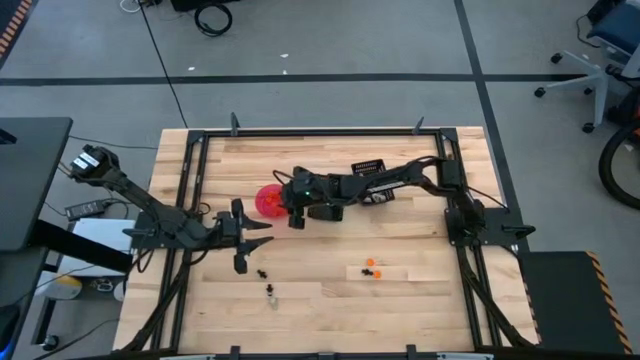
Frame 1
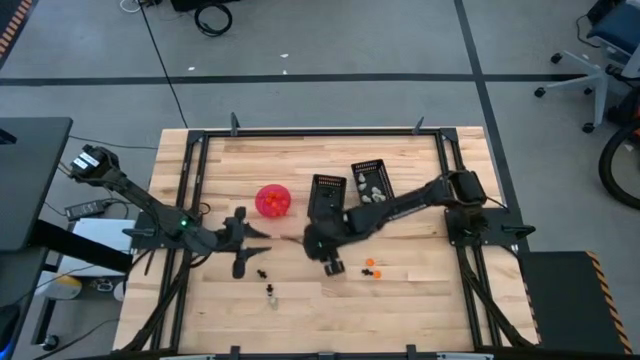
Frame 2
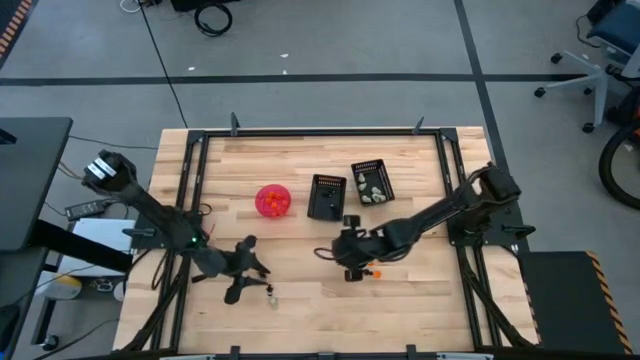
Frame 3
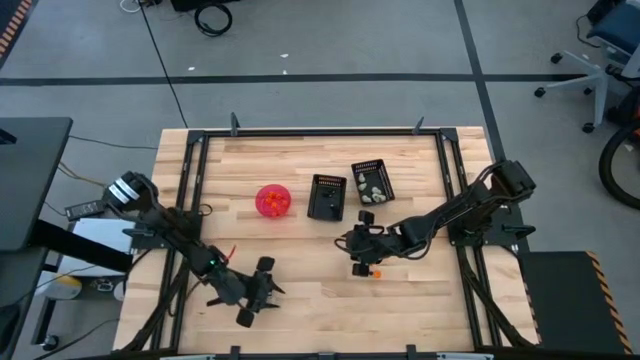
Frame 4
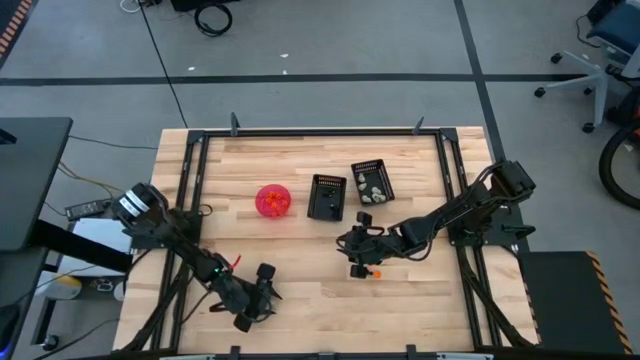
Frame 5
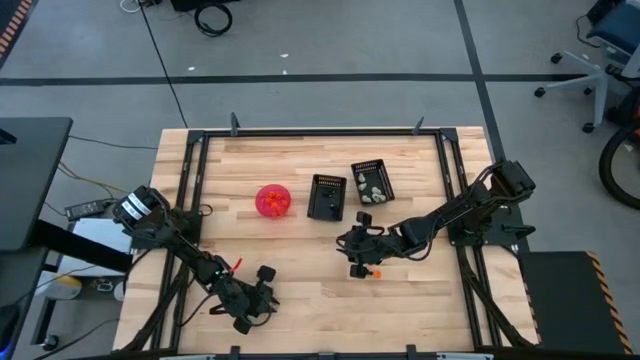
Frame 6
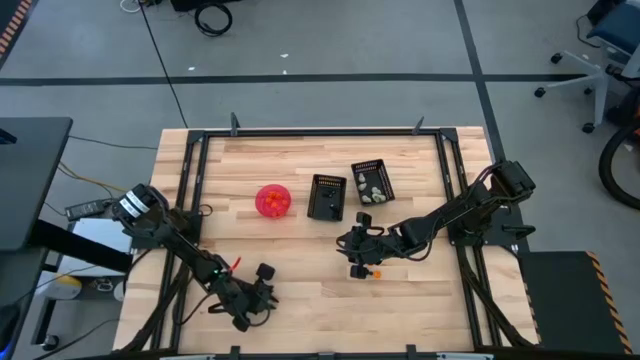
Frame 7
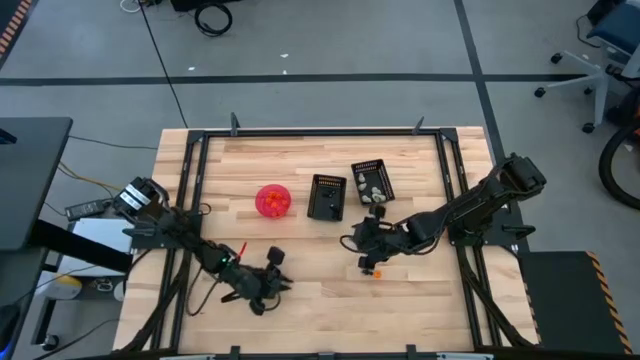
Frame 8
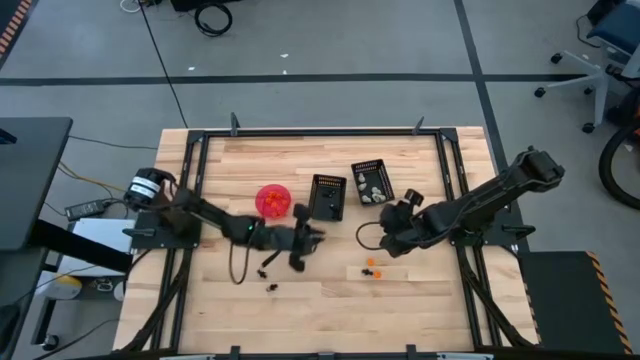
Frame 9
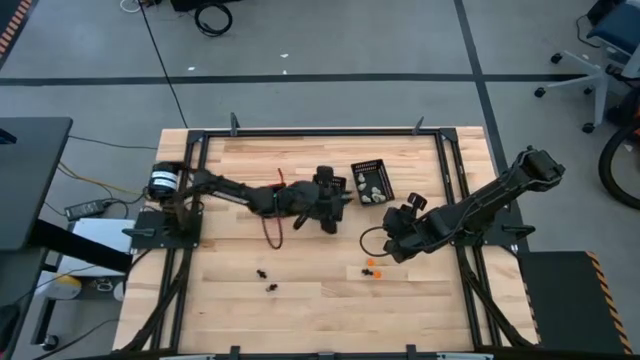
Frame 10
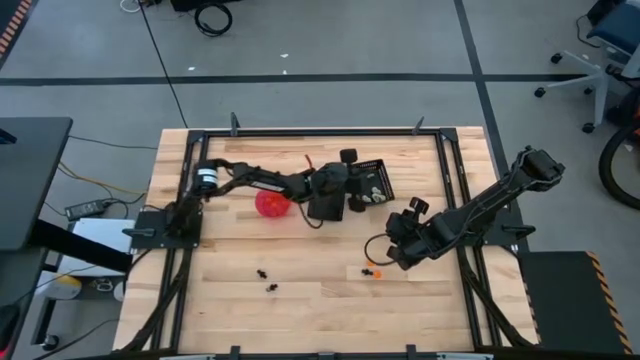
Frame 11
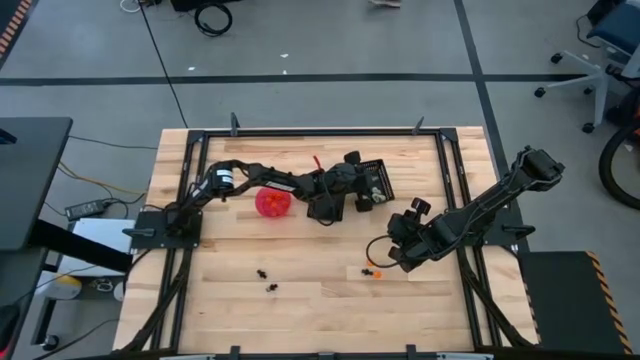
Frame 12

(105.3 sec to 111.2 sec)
Task: Sort Halloween decoration
Put the white skull toy into the right black bin

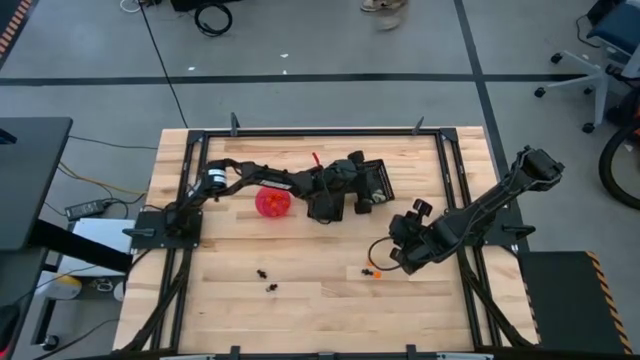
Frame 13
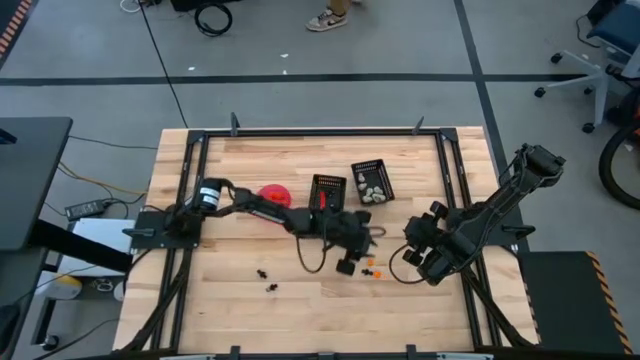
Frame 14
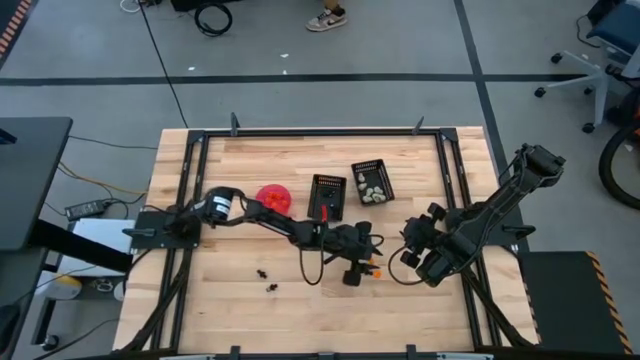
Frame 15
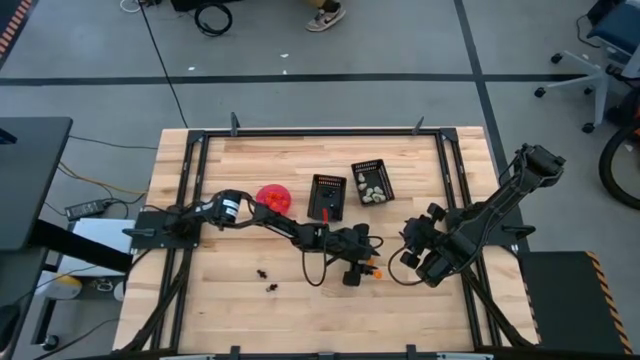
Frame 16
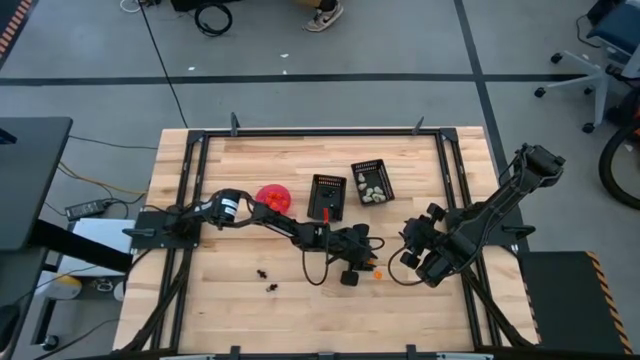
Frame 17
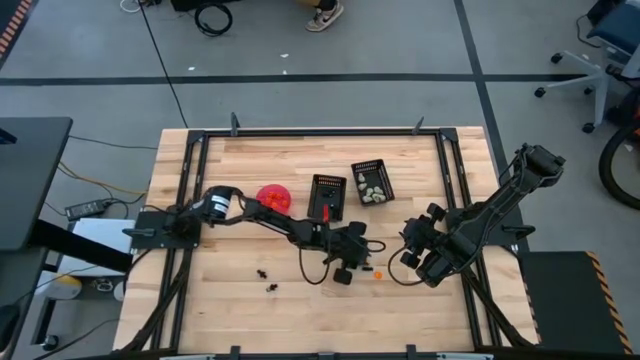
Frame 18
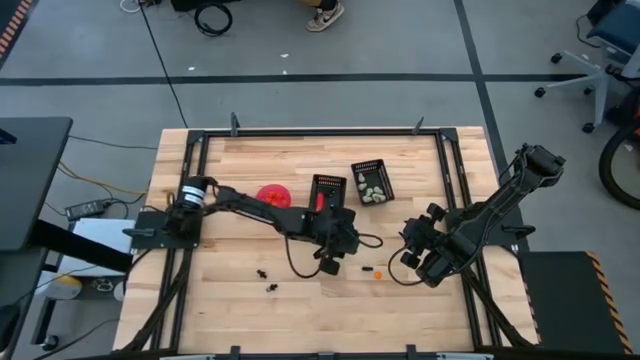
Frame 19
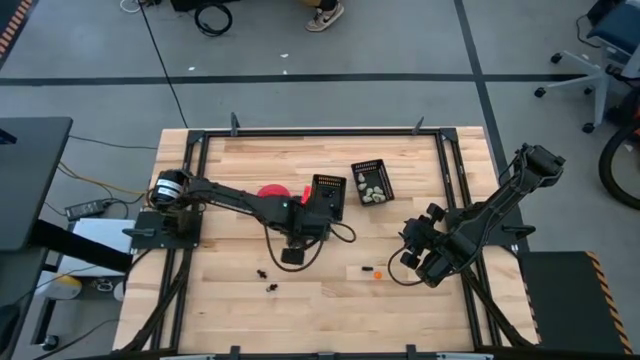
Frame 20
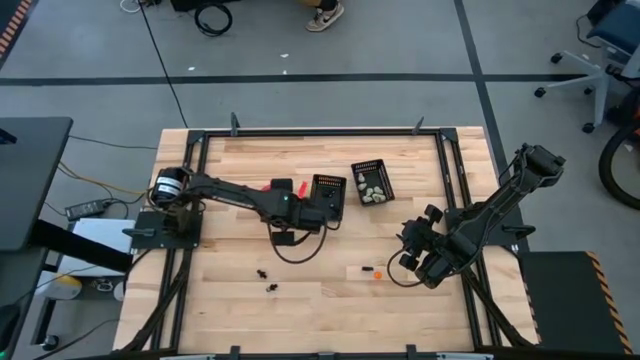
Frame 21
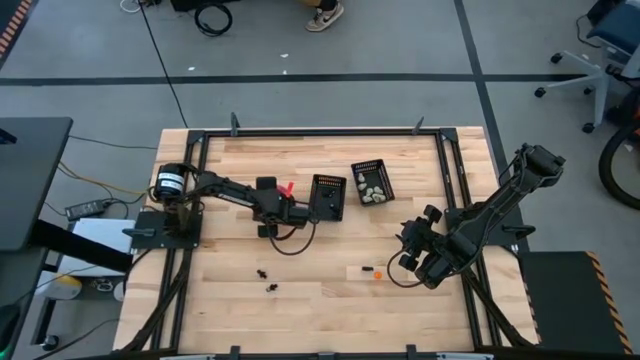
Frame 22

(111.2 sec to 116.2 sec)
Put the orange pumpkin toy into the red bowl

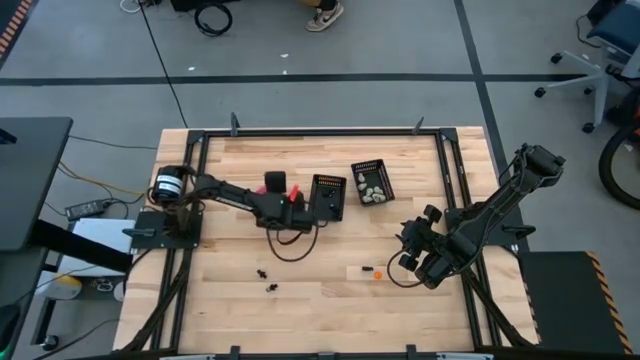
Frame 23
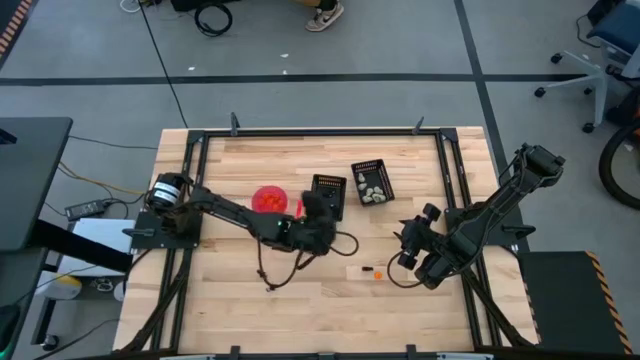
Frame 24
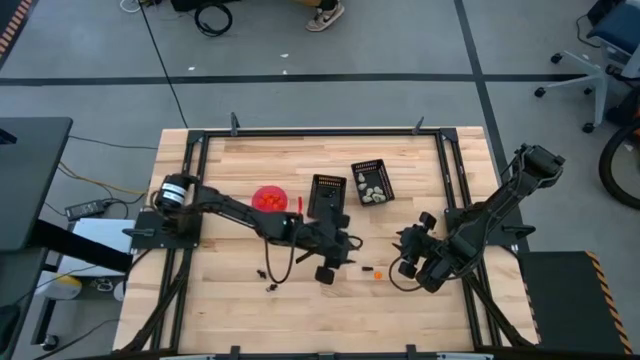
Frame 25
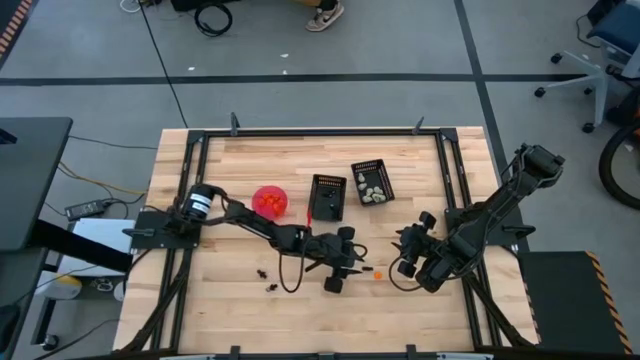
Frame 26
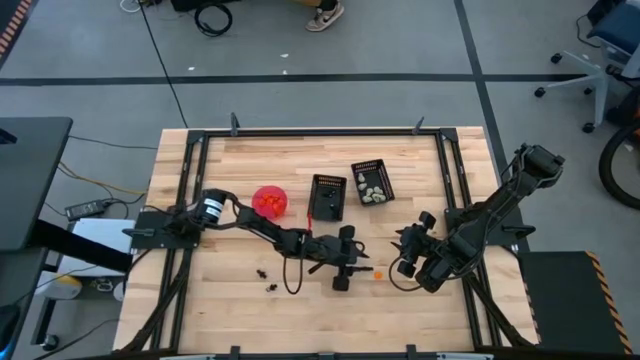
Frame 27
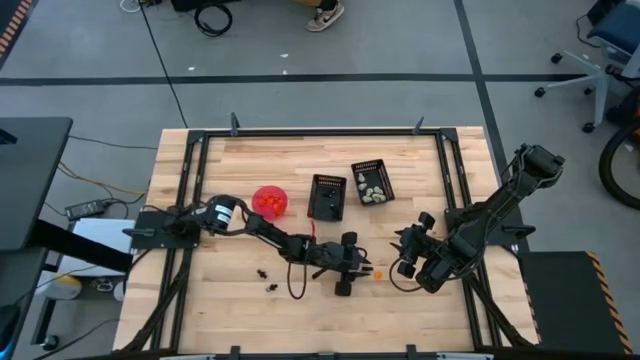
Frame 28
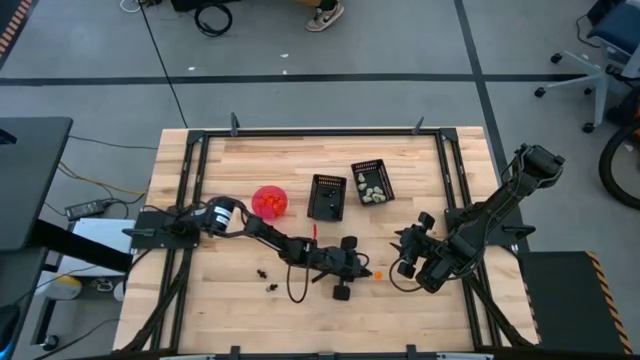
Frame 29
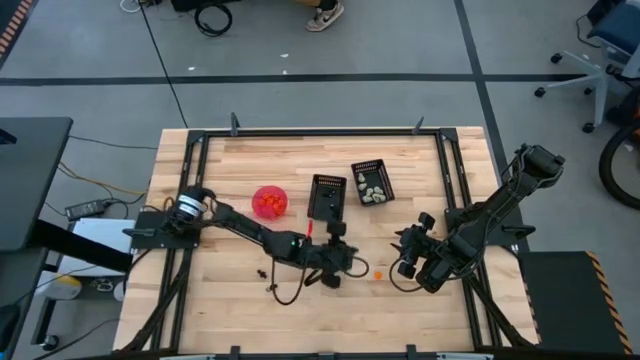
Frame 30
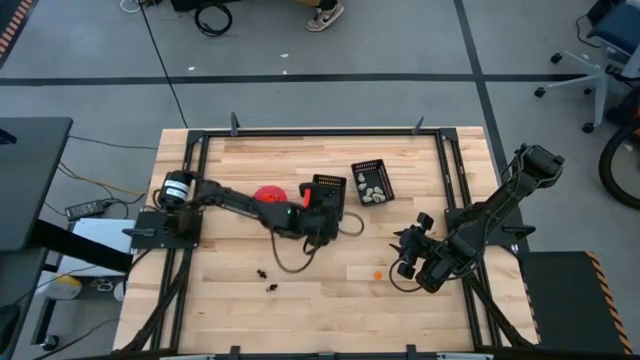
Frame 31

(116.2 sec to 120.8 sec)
Put the black skeleton toy into the left black bin

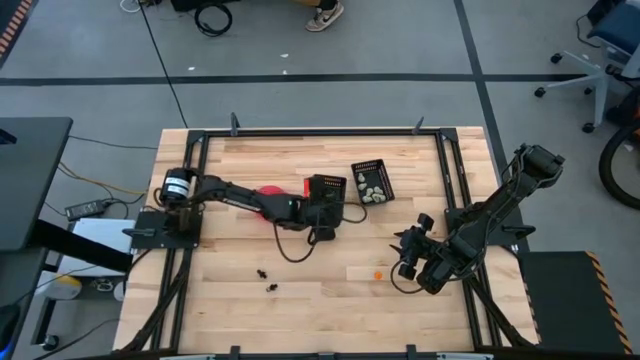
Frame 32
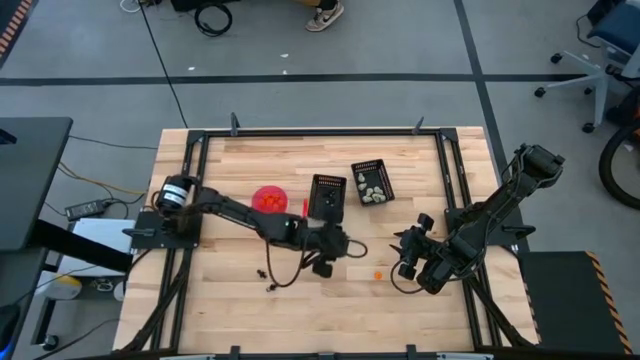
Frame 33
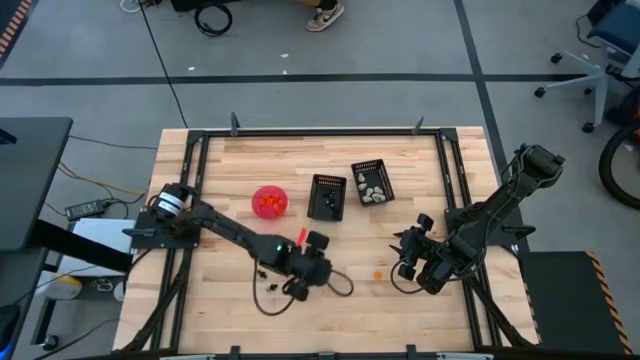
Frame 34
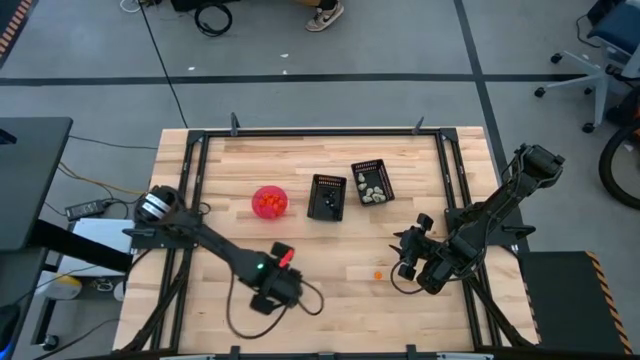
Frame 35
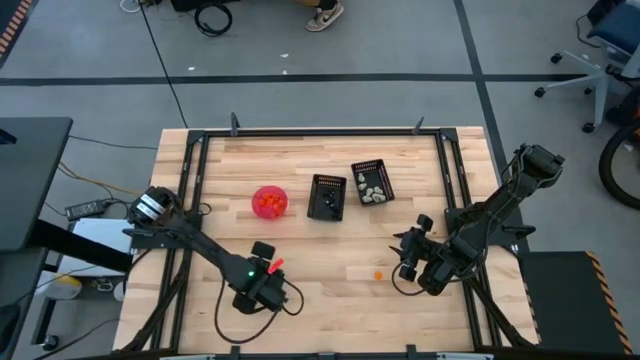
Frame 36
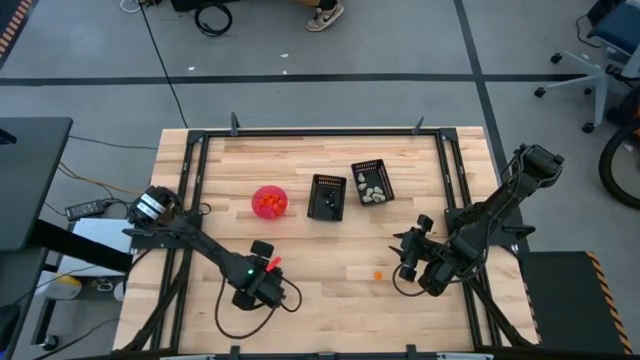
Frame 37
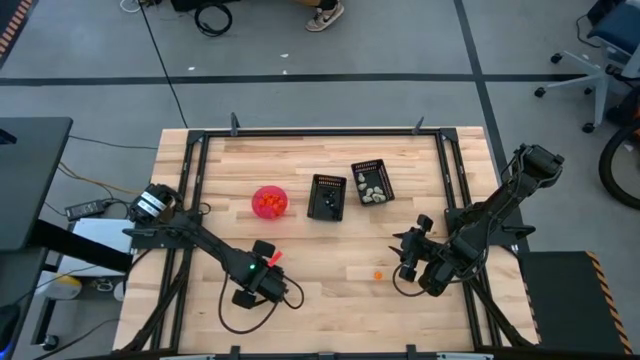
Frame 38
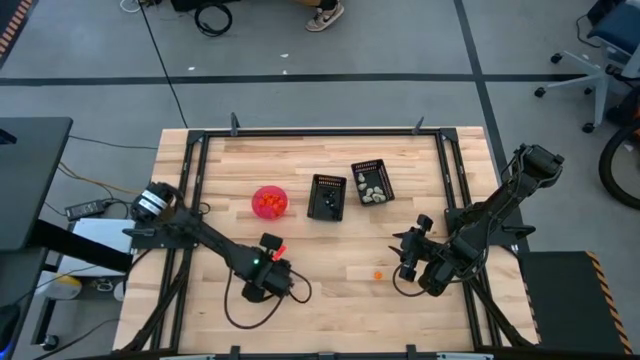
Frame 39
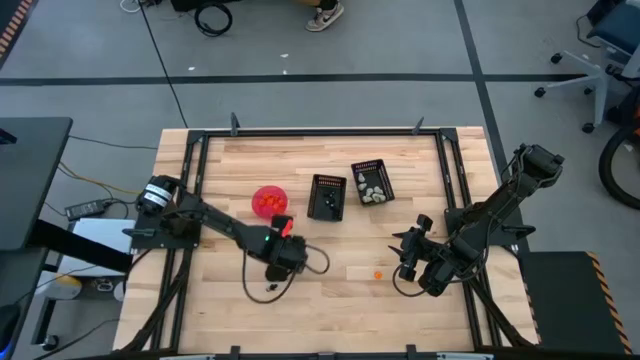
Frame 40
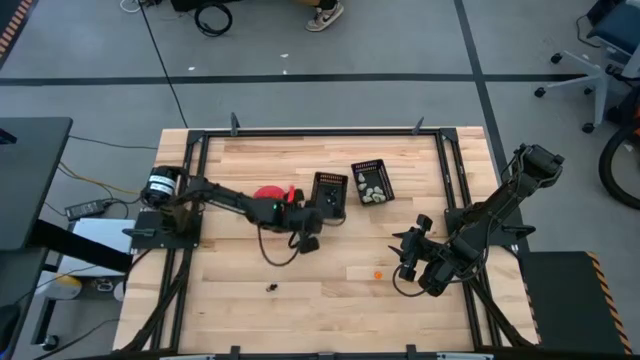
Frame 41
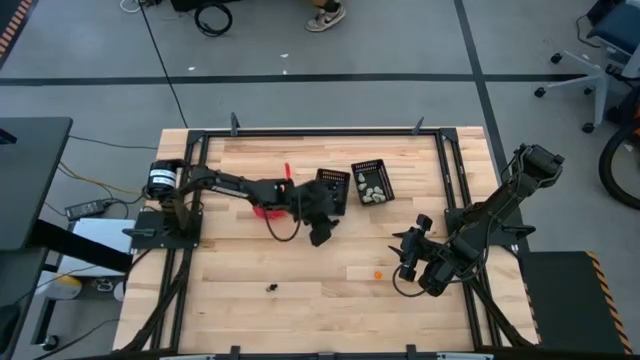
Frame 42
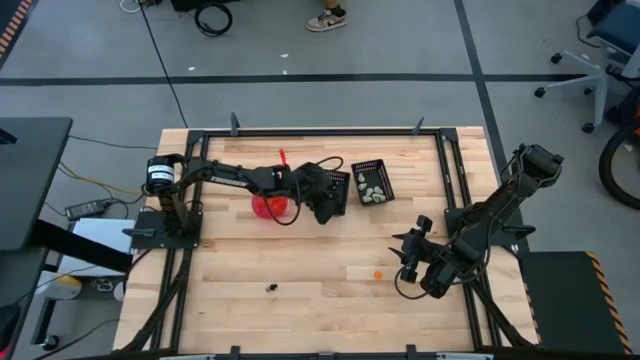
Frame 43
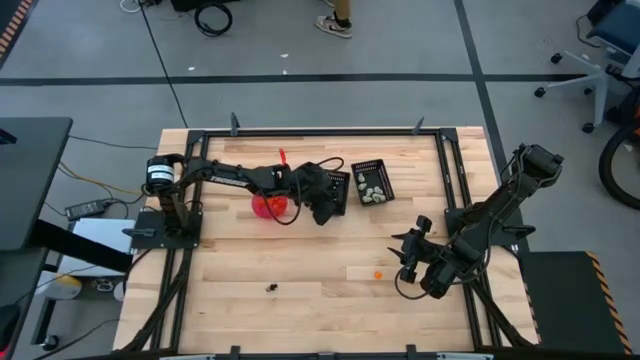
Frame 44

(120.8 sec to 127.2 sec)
Put the black skeleton toy into the left black bin
